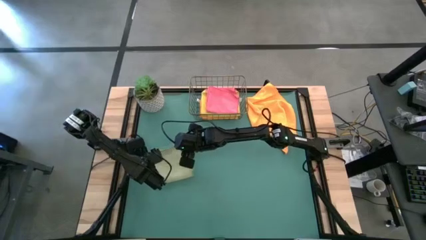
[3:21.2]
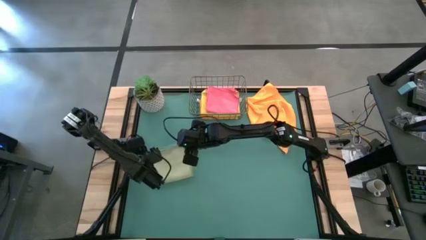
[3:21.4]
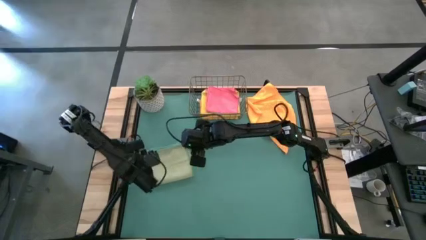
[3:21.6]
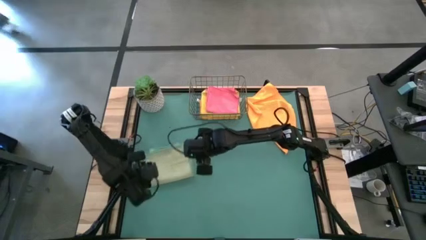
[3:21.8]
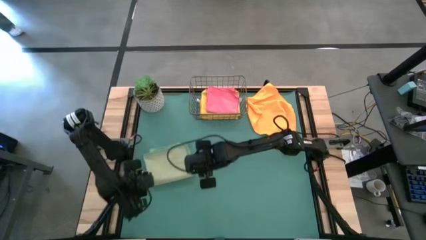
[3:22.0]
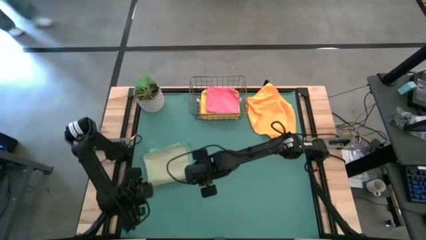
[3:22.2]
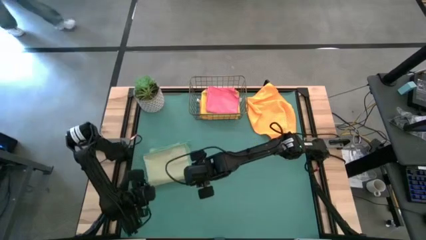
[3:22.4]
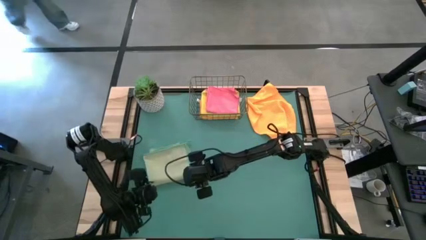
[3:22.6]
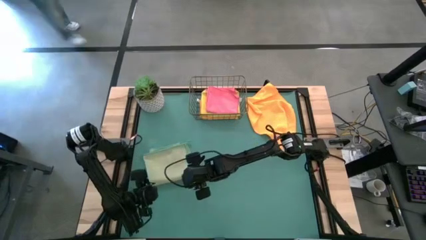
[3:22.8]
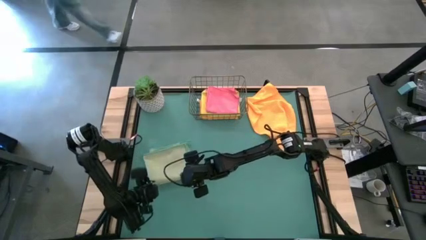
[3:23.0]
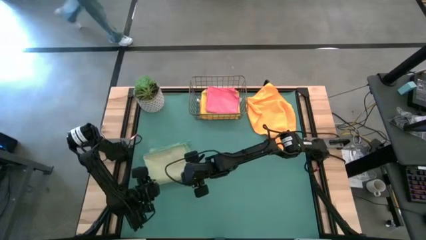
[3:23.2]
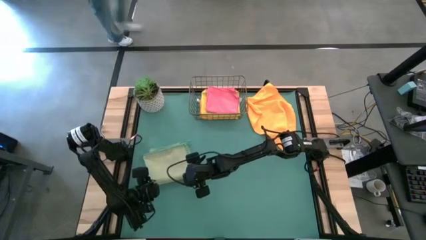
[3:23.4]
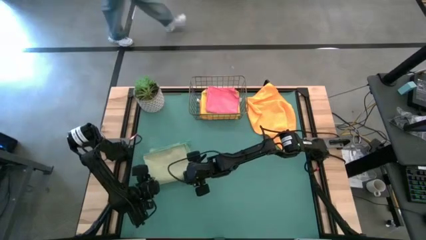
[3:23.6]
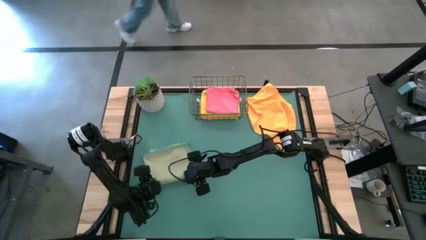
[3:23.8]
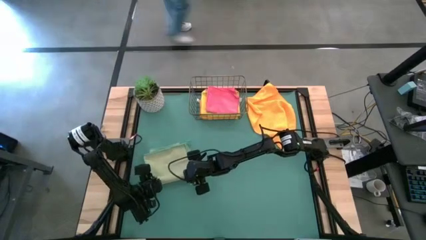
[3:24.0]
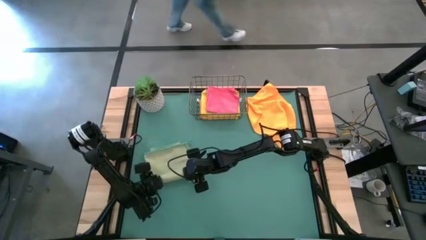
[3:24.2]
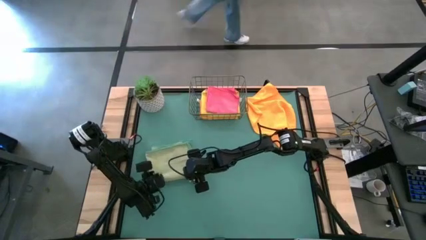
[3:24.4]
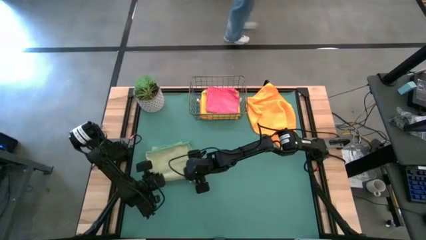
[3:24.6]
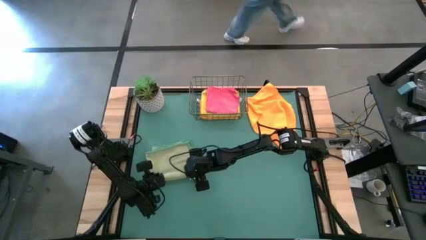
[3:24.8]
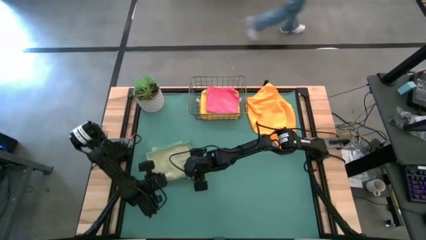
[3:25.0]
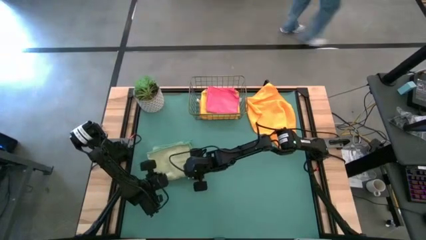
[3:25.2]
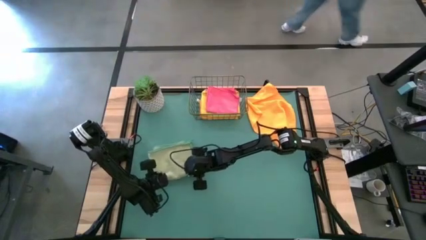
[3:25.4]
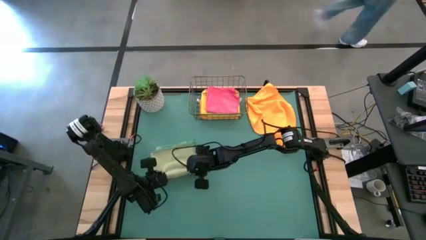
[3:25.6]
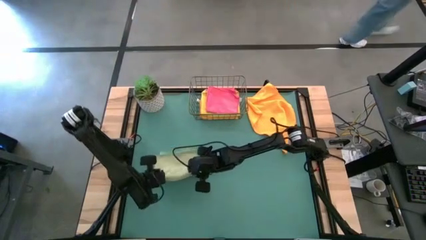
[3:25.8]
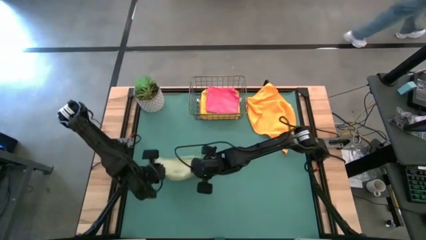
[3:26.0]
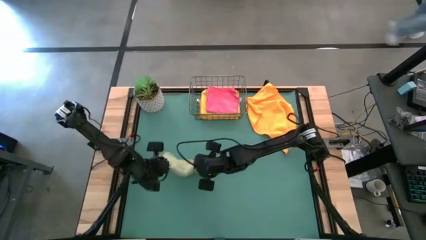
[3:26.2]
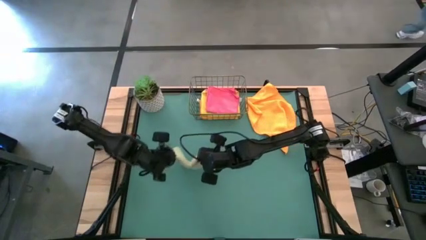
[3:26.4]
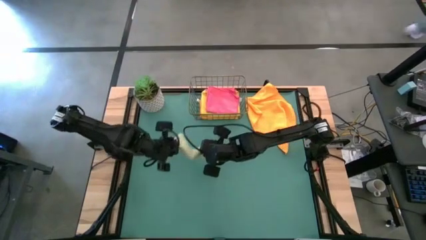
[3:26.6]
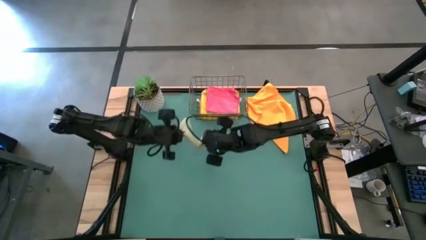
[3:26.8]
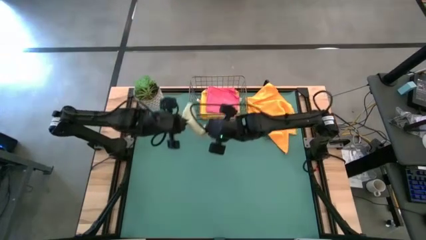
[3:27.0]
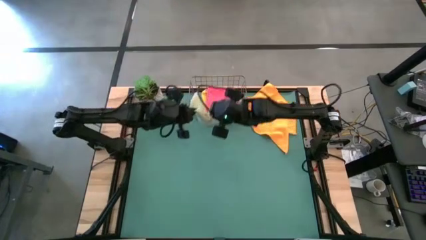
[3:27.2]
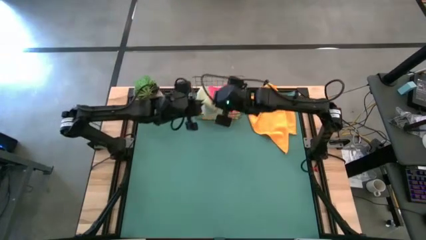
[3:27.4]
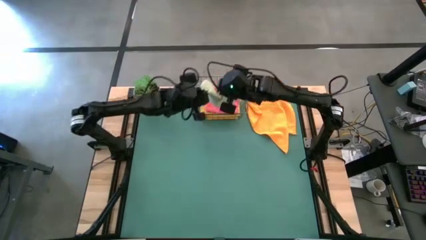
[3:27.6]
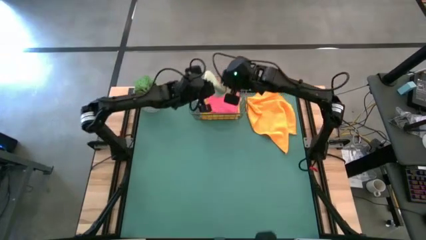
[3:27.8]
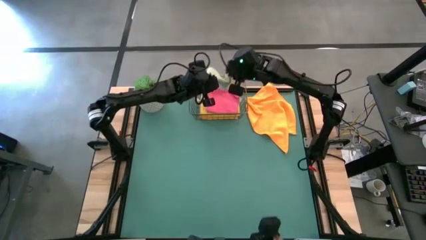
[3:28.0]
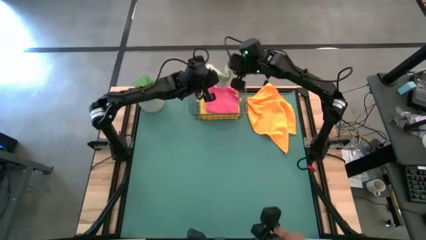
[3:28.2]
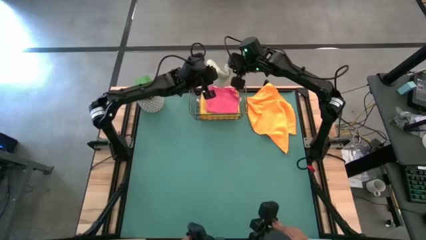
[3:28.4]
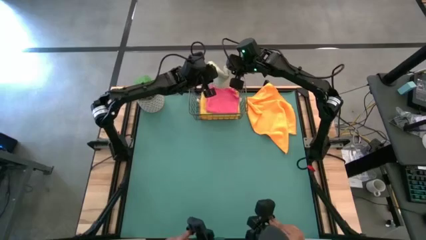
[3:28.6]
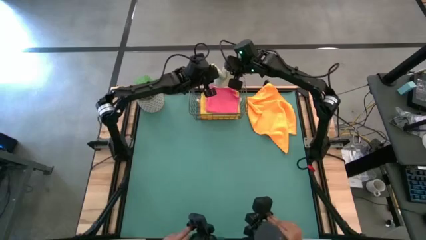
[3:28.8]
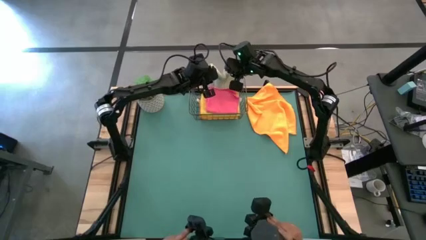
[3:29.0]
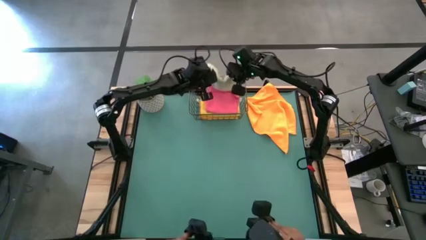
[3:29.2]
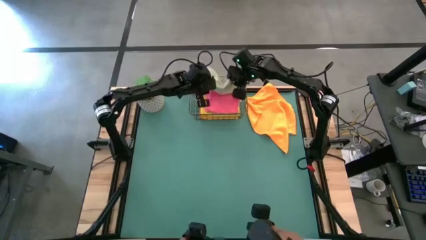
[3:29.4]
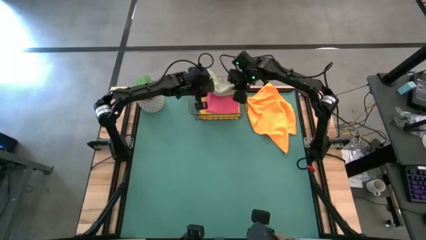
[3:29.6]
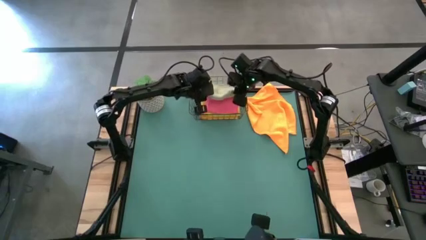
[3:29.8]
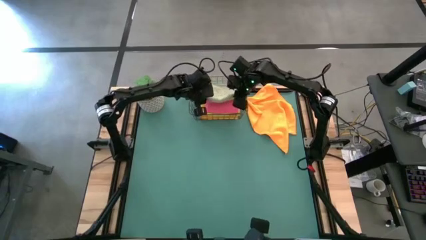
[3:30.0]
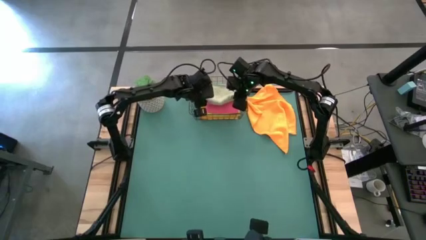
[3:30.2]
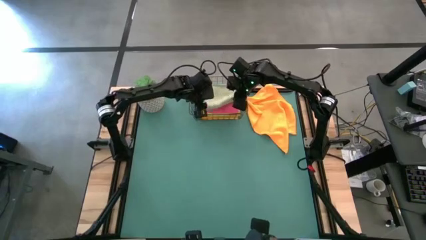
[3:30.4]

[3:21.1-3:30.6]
Task: Fold microfiber towels
Put the green microfiber cloth into the wire basket

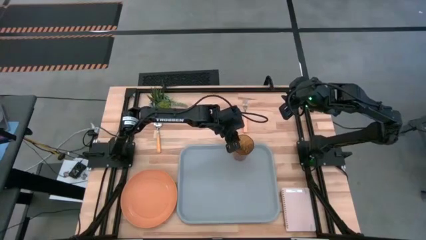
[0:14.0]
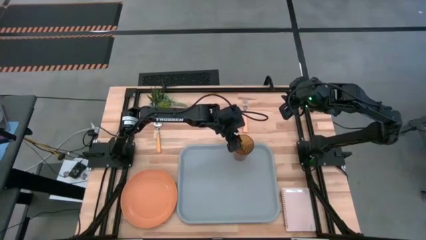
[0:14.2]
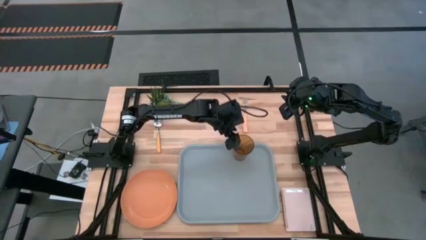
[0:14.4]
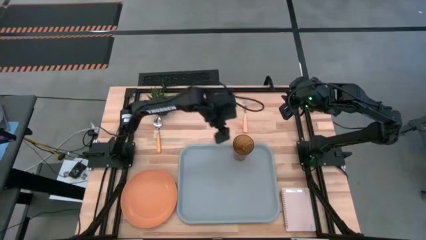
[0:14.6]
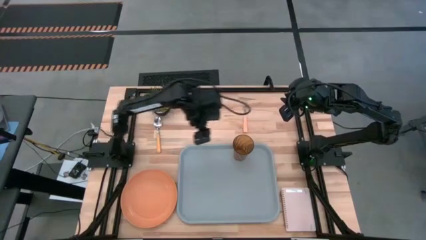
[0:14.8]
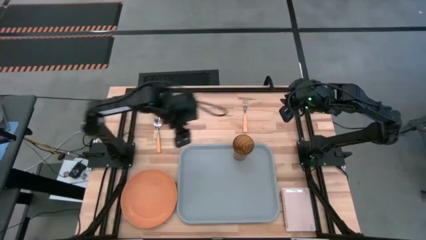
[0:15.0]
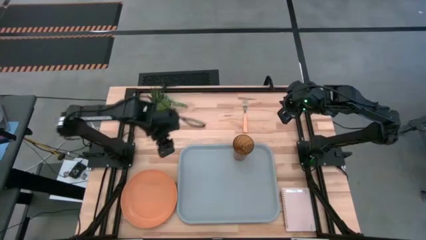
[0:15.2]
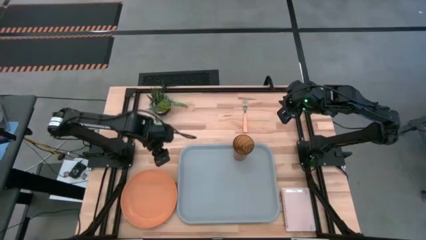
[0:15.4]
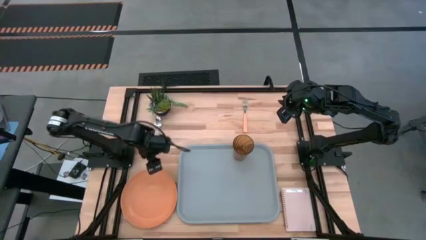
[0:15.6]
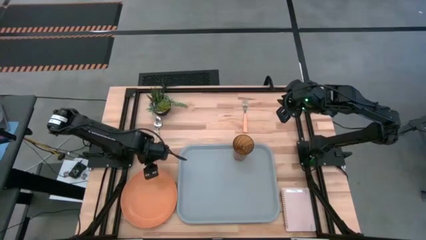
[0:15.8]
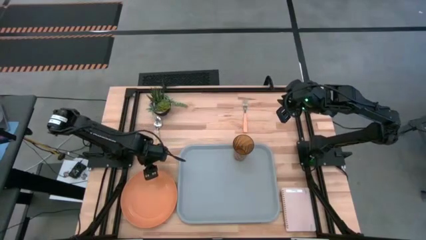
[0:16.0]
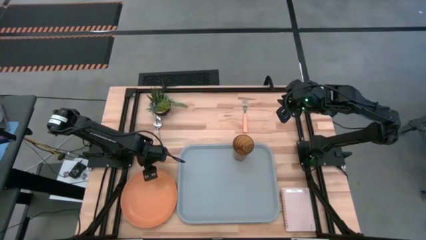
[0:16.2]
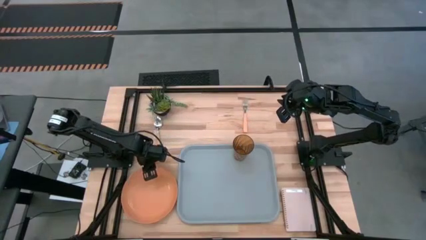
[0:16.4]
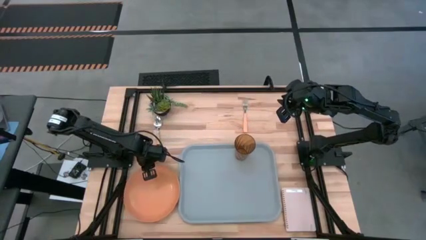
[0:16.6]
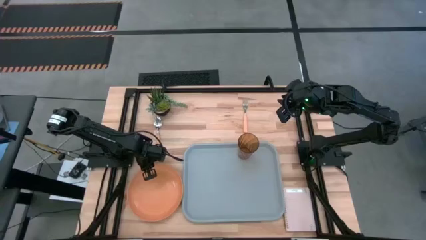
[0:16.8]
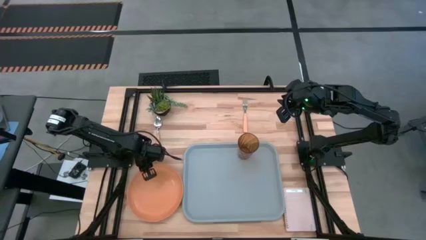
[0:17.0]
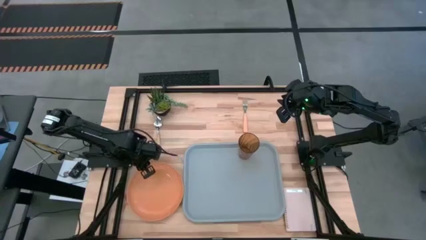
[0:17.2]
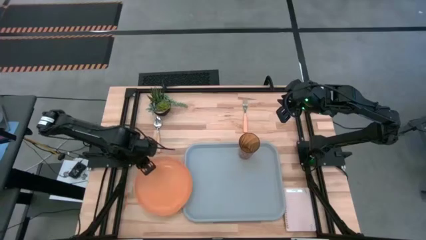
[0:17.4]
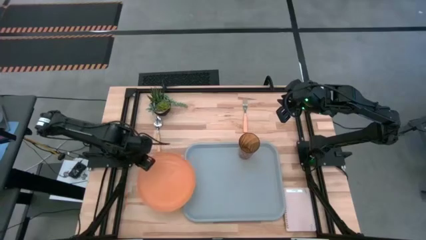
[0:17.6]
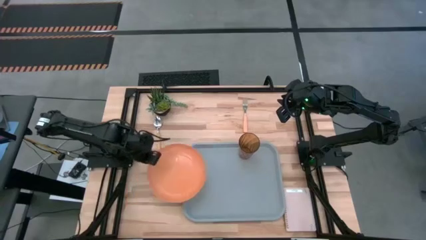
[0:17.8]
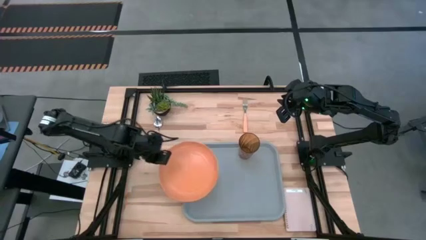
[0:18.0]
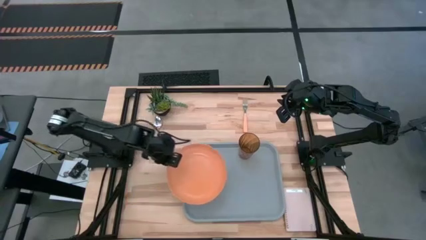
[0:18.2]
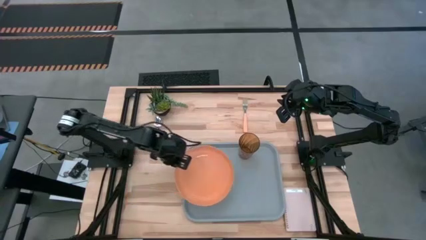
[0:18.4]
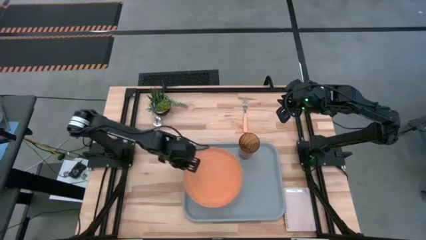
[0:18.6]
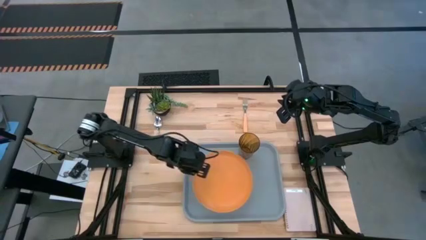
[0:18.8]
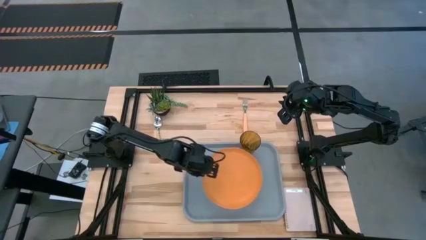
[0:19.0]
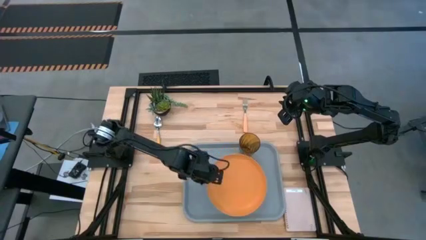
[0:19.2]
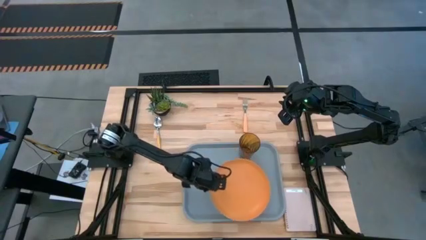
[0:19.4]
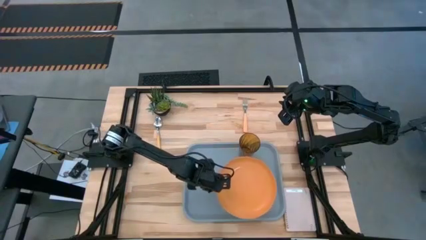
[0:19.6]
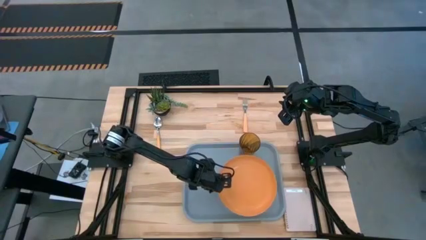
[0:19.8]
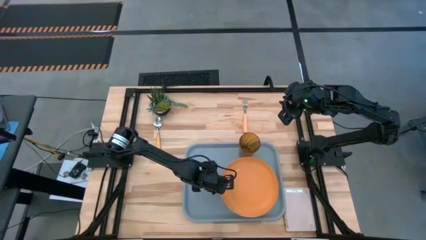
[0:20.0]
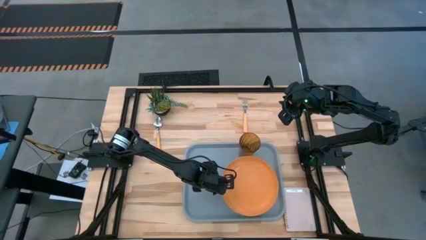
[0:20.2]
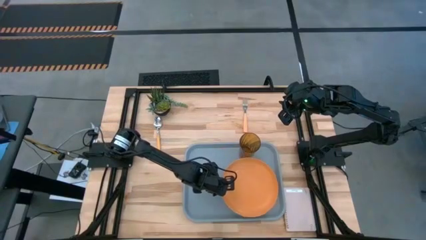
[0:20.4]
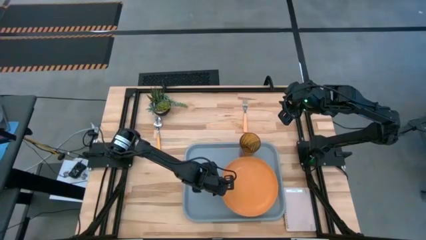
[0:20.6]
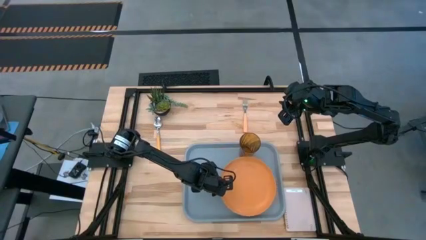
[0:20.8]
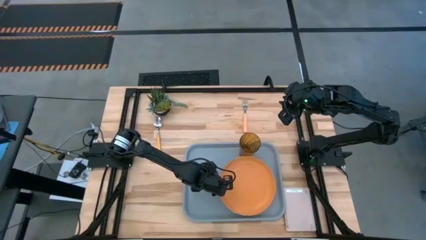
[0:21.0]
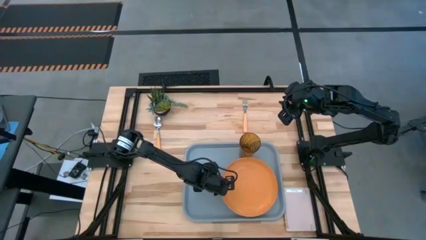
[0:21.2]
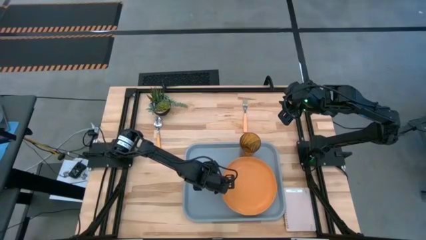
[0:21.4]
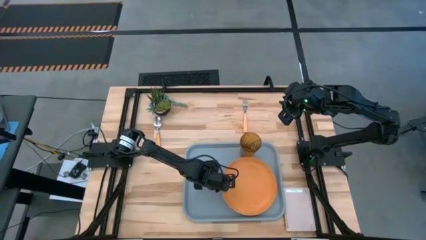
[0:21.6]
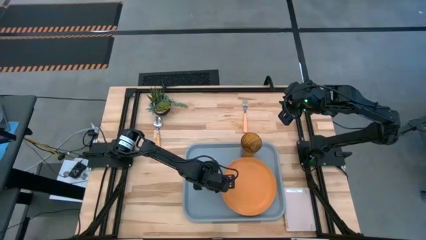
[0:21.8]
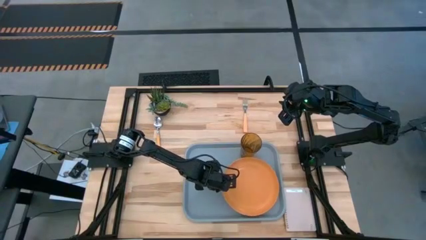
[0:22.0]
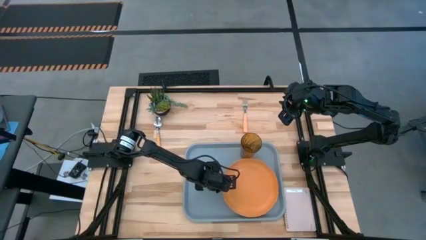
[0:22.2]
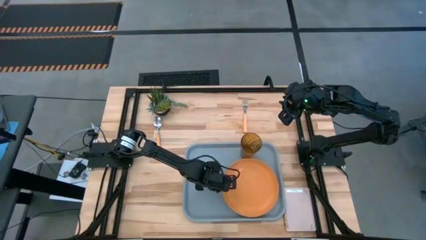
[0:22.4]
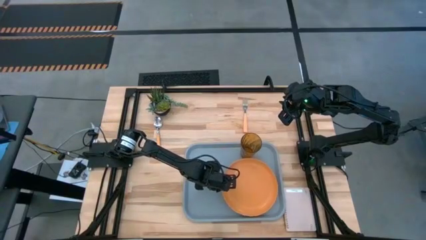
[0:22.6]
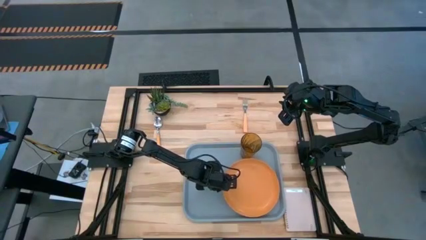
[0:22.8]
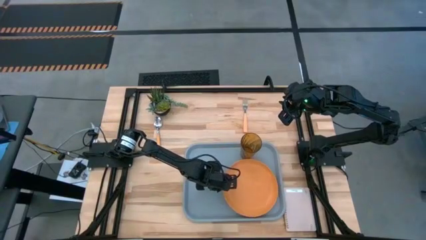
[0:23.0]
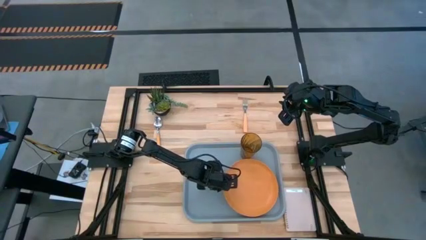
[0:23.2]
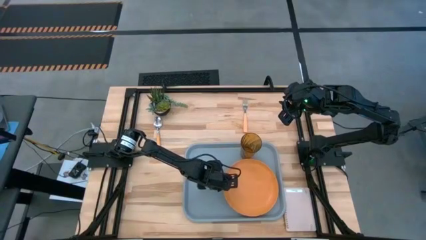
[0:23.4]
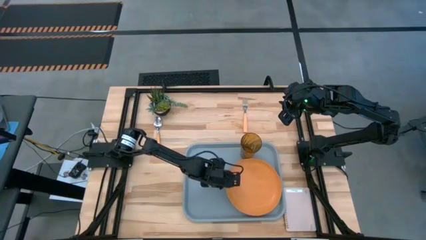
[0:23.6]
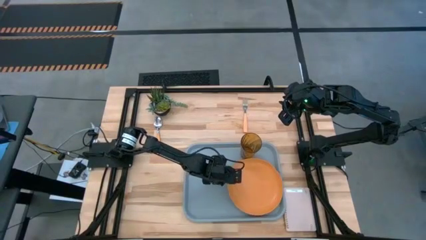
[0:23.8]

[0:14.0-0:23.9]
Task: Pick and place plate/cup/fork/spoon on tray
Put the orange plate on the gray tray
